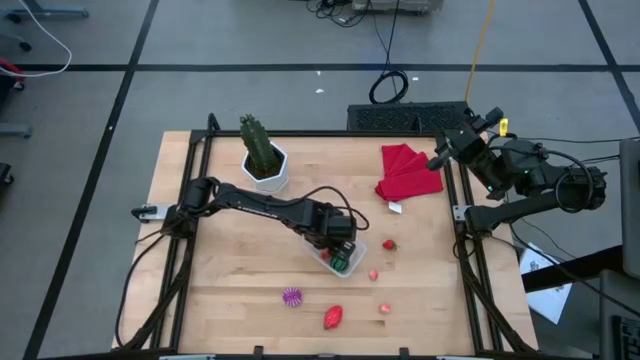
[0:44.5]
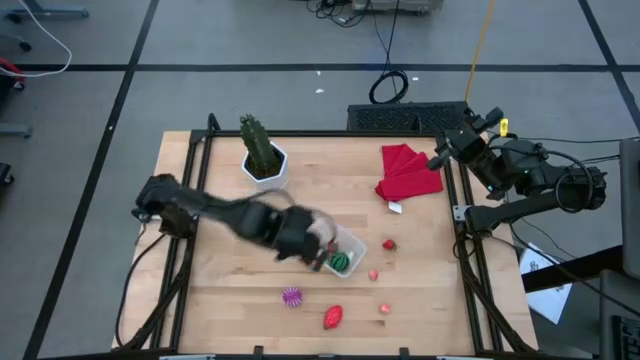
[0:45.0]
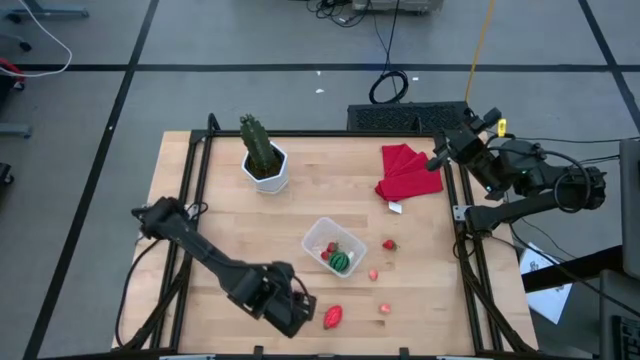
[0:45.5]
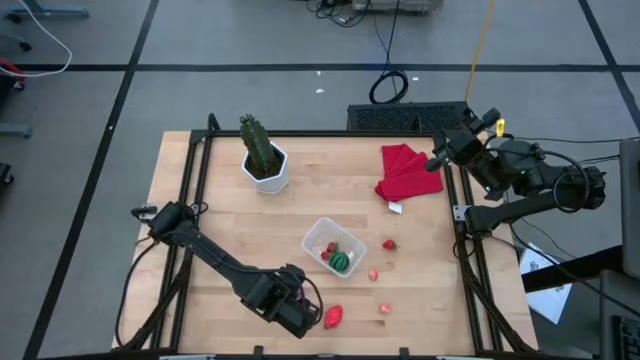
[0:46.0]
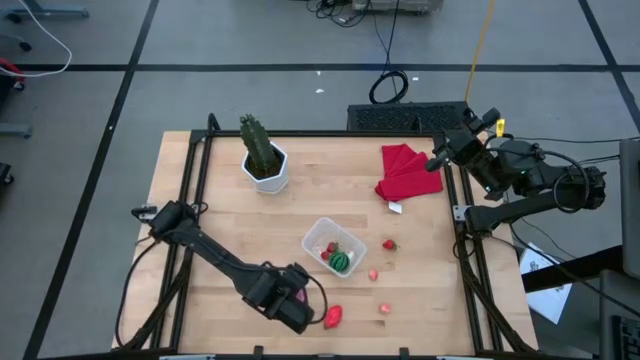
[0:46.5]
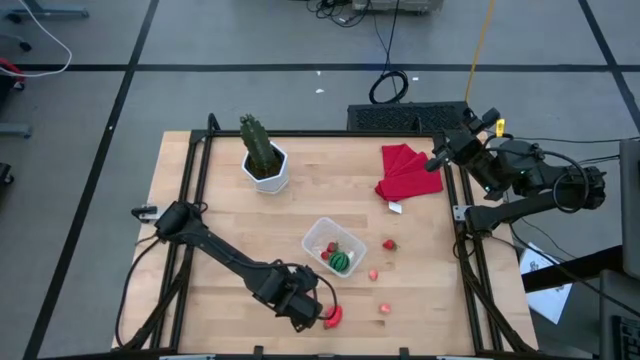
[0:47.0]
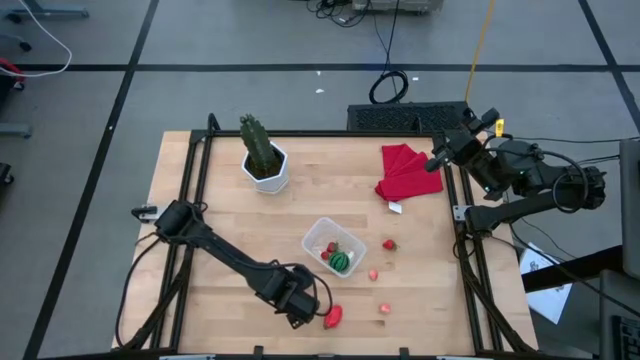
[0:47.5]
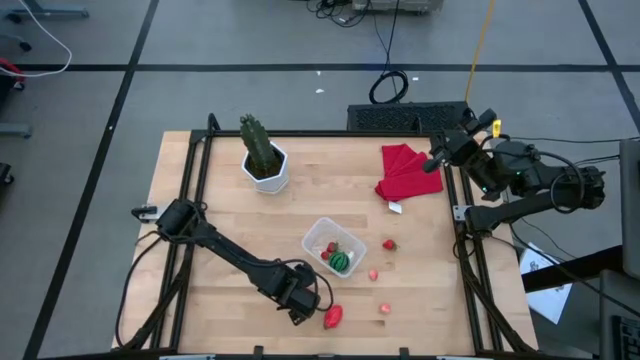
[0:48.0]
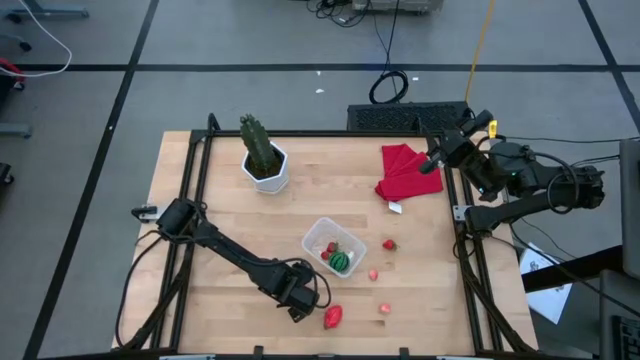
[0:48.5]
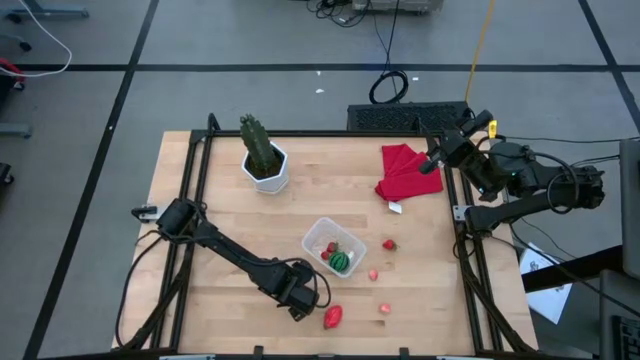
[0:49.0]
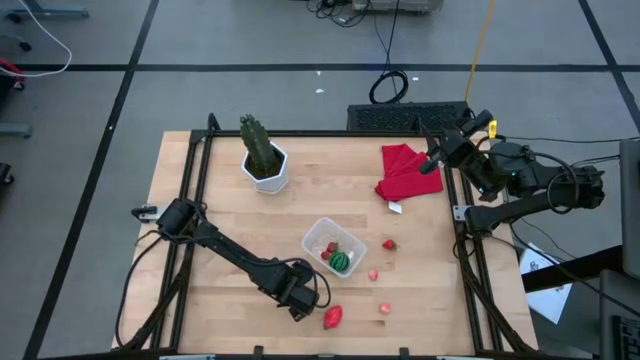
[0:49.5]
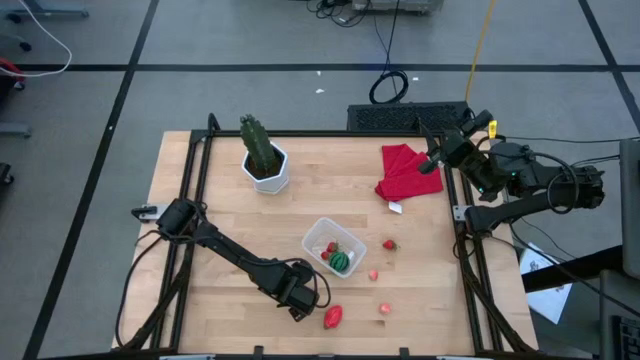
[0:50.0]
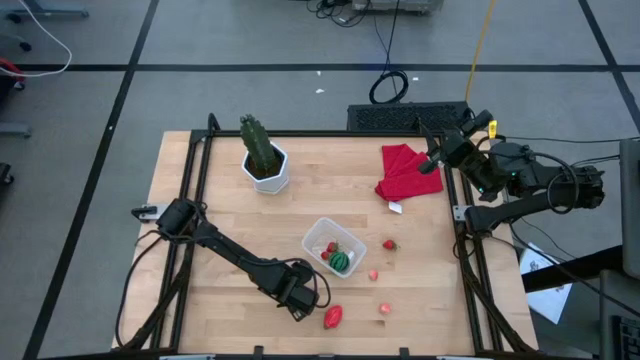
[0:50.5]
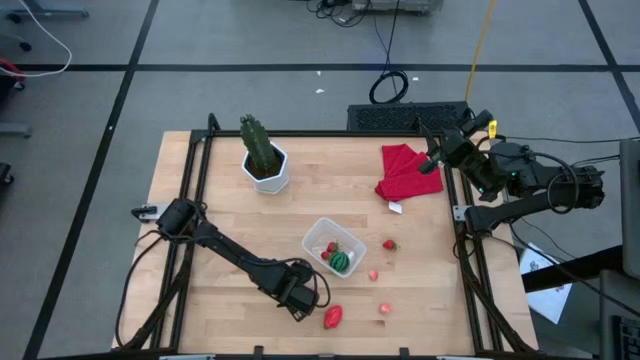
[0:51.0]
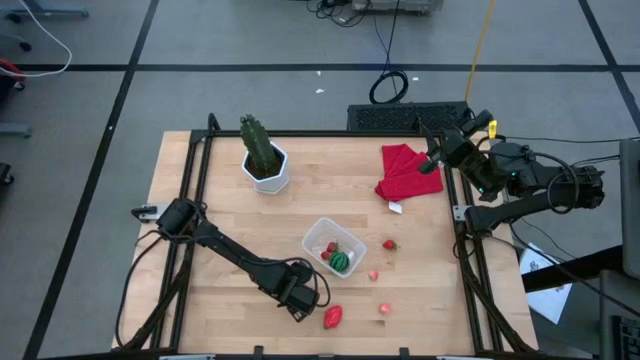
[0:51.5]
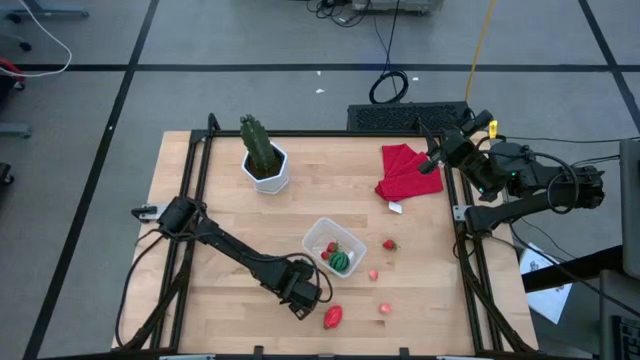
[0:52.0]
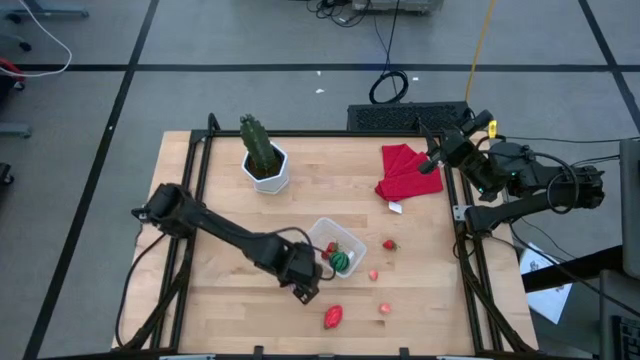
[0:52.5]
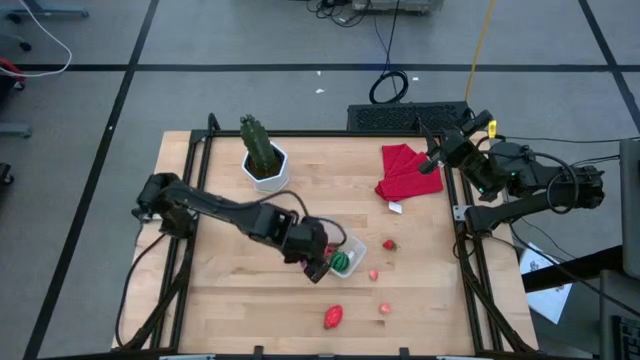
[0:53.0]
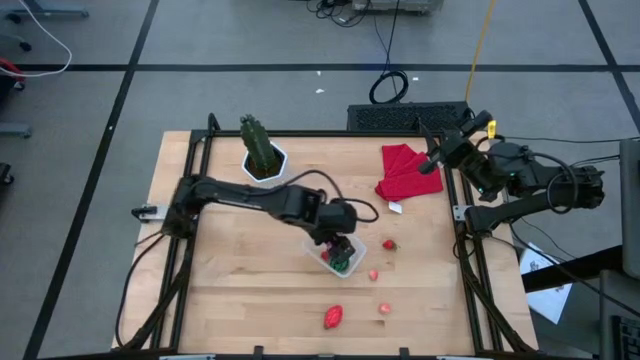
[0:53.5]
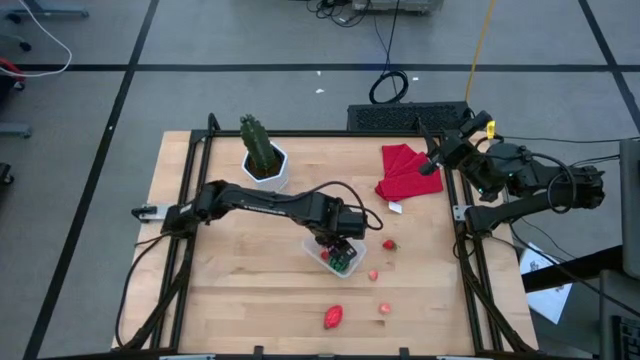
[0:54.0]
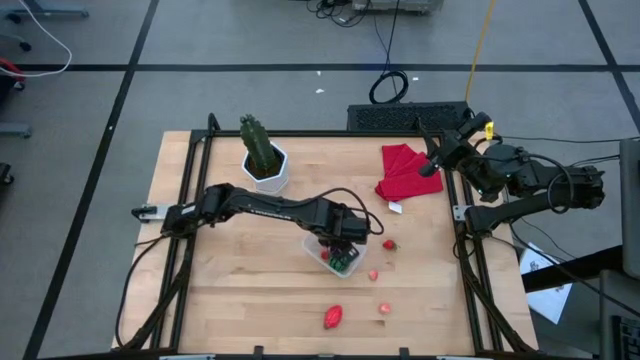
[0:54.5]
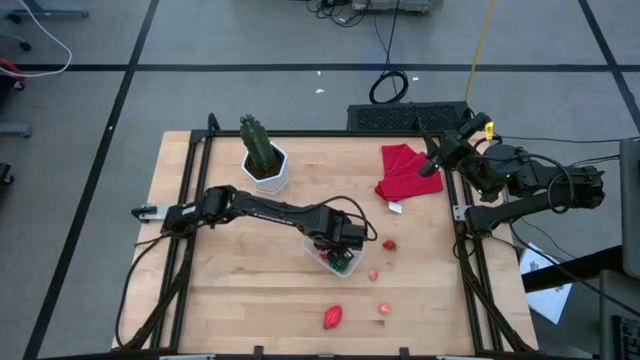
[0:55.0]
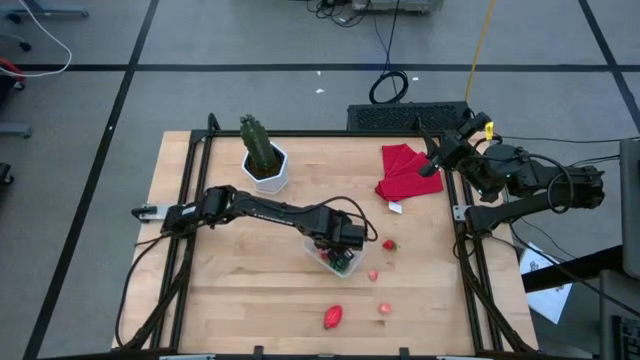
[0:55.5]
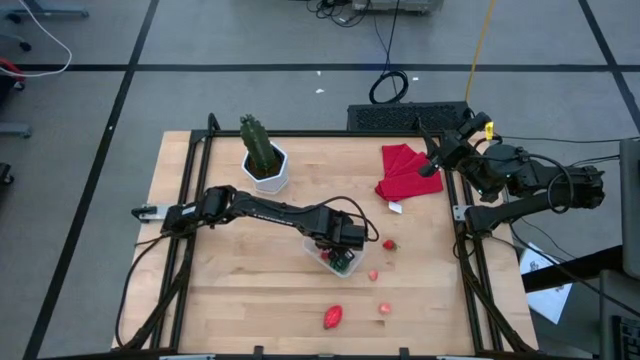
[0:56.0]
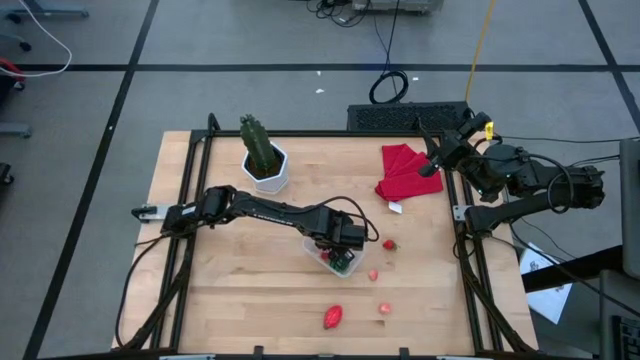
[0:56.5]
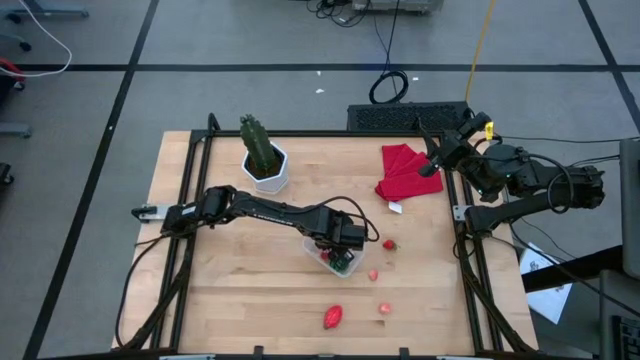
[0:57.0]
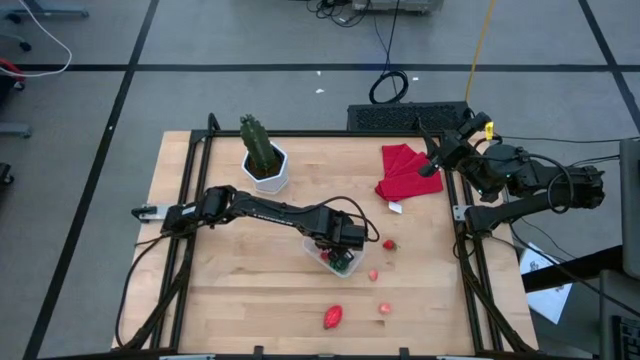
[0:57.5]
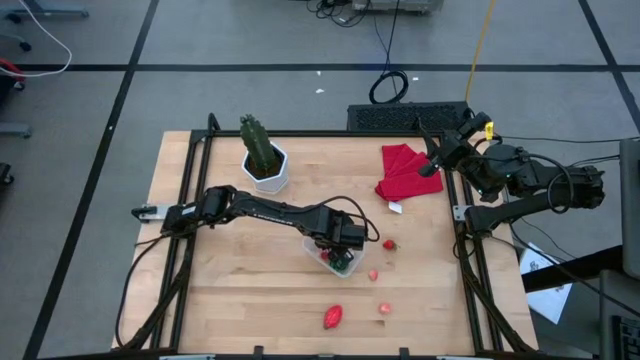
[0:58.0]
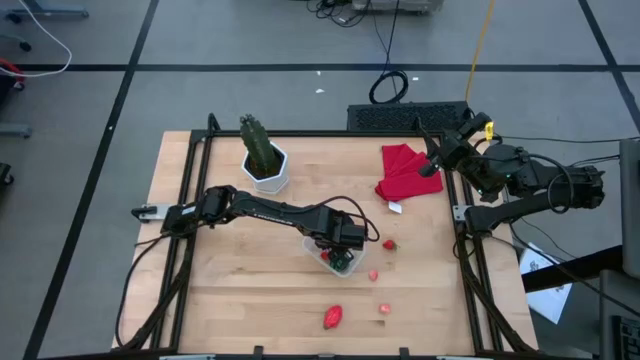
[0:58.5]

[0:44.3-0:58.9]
Task: Pick and placing Produce into tupperware
Put the onion into the transparent bin

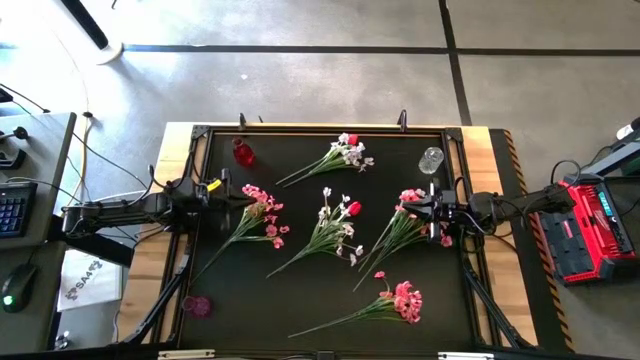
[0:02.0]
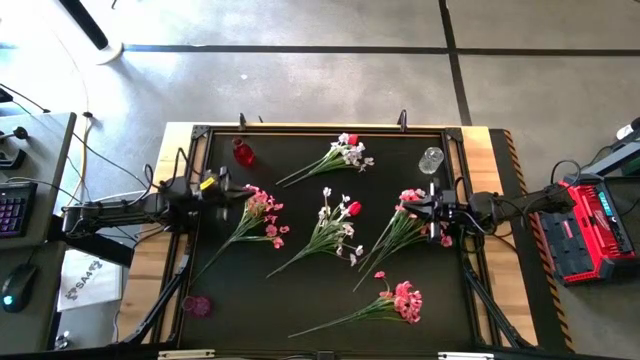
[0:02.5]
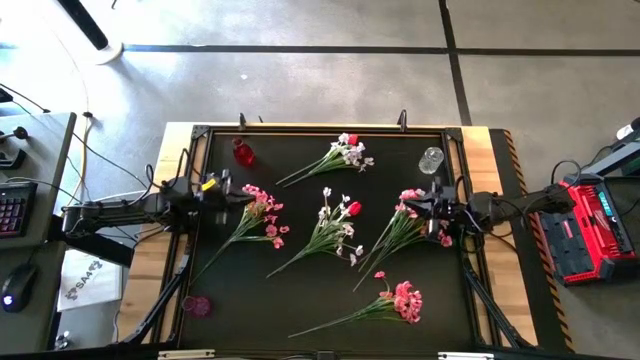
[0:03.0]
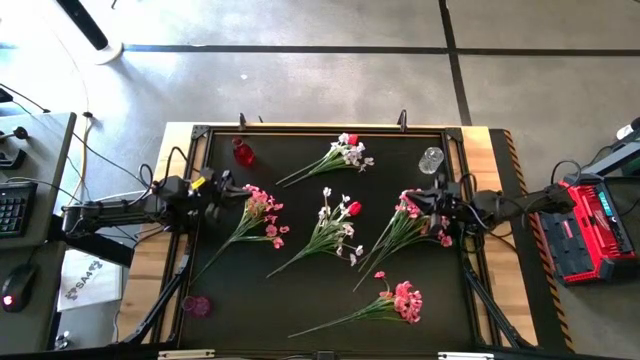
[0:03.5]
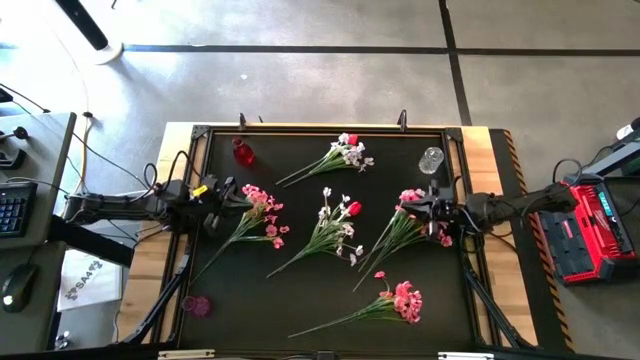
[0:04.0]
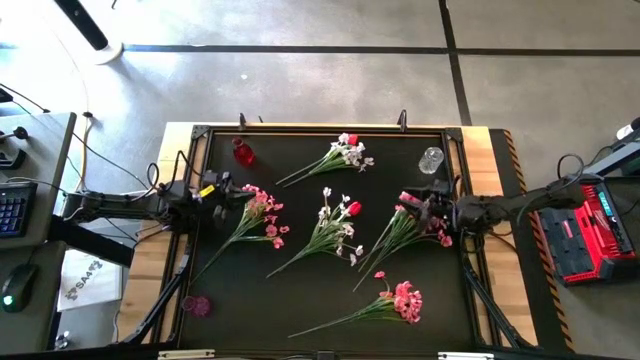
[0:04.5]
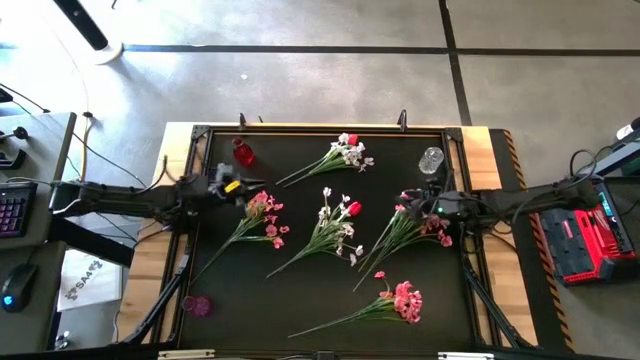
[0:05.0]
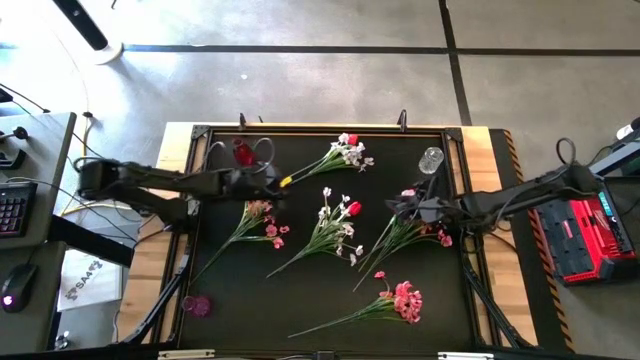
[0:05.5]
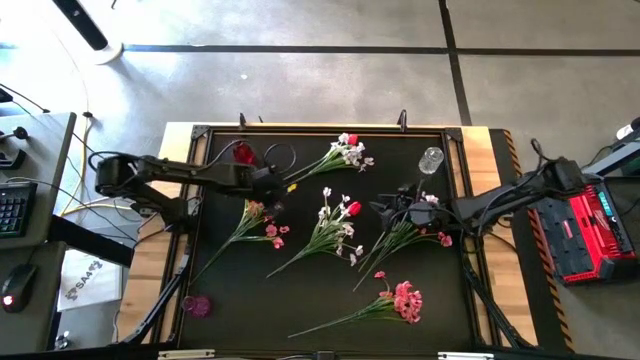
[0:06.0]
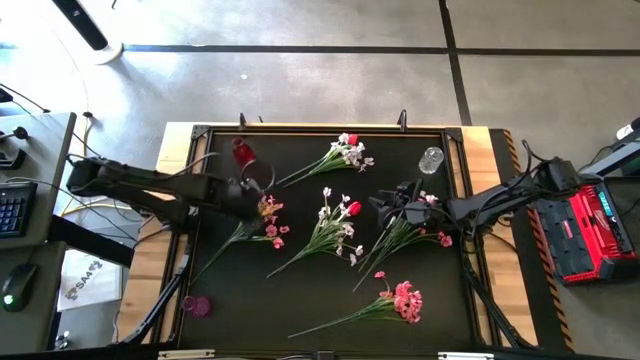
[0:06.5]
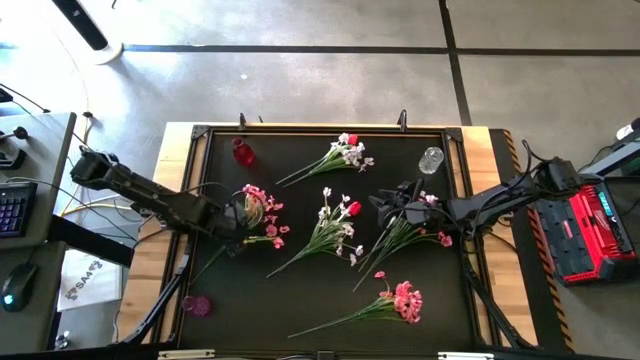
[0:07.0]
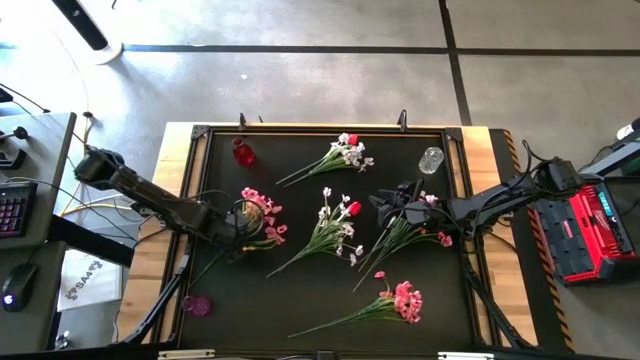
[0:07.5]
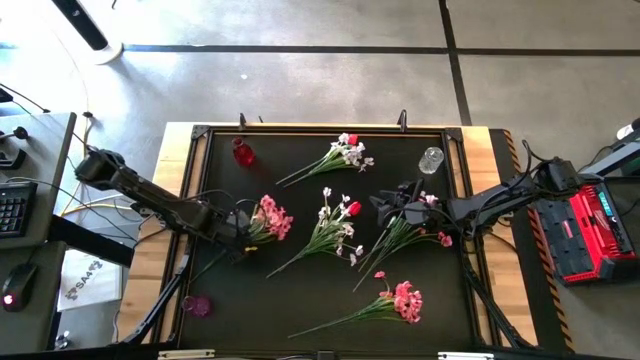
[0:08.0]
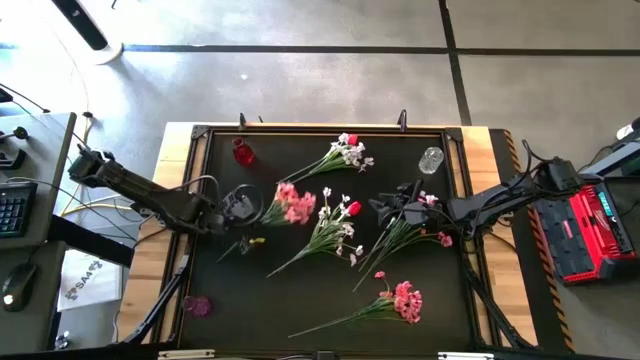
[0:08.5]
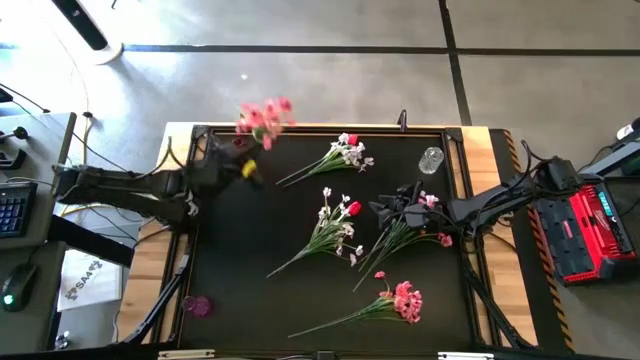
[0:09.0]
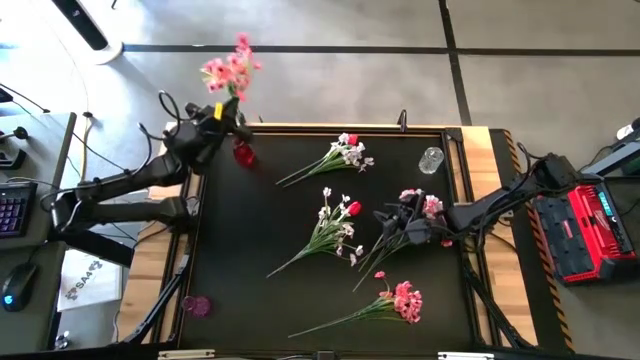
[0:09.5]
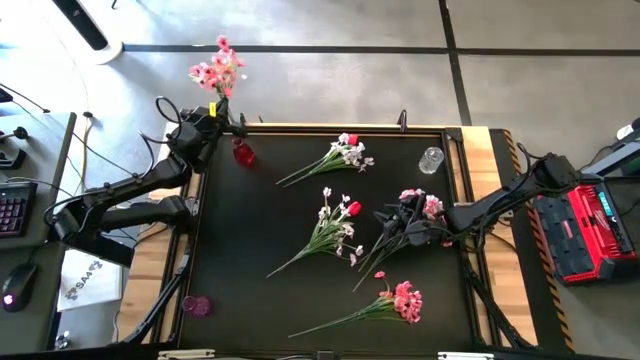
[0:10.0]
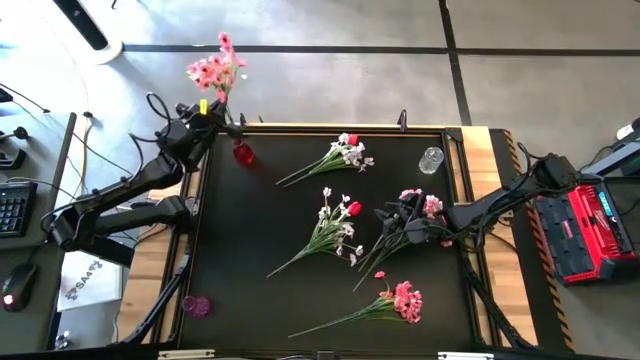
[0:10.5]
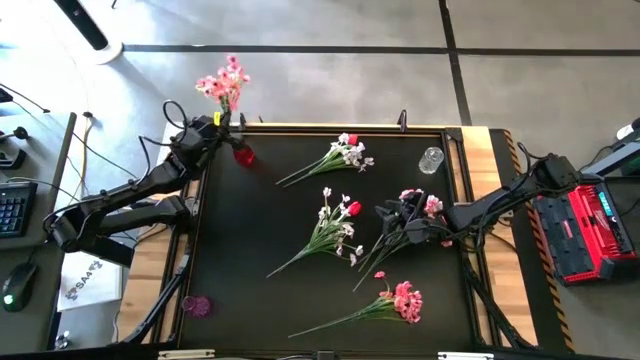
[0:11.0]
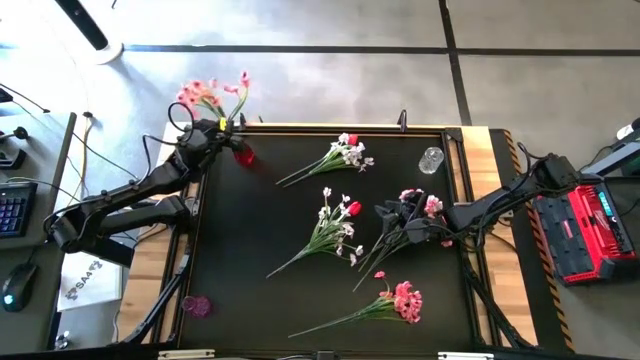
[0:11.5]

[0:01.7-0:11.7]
Task: Sort flowers into vase by color
Put the middle left pink flower into the red vase
